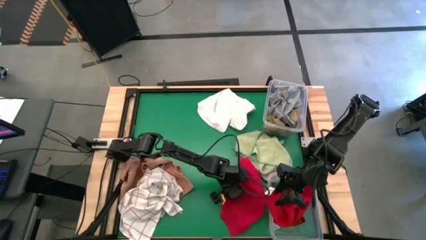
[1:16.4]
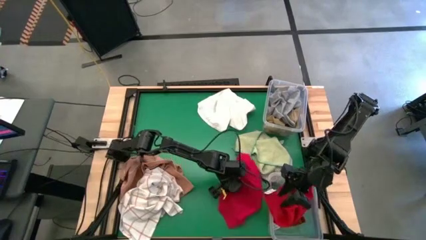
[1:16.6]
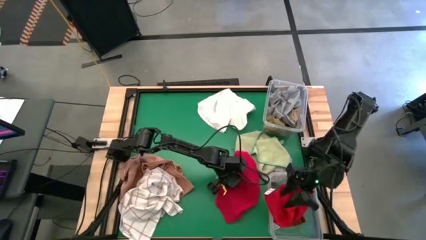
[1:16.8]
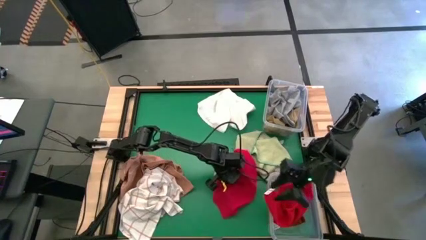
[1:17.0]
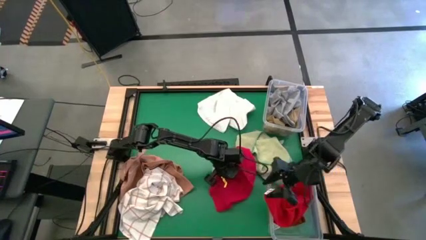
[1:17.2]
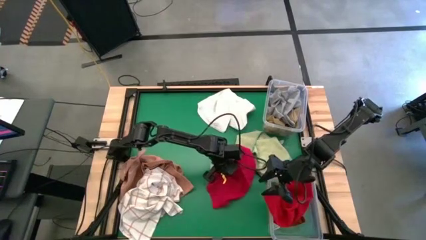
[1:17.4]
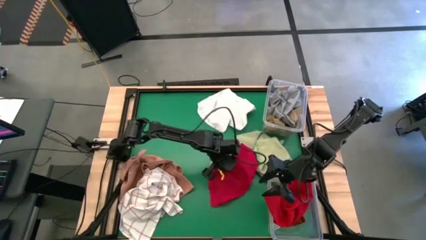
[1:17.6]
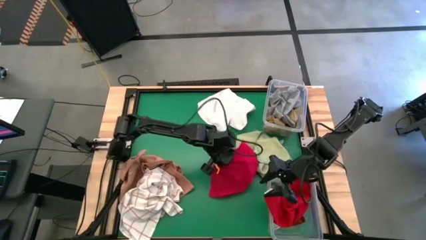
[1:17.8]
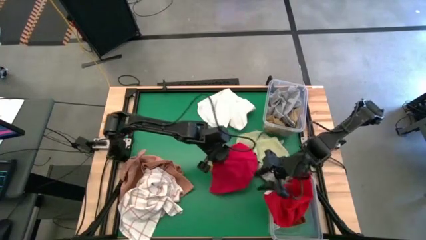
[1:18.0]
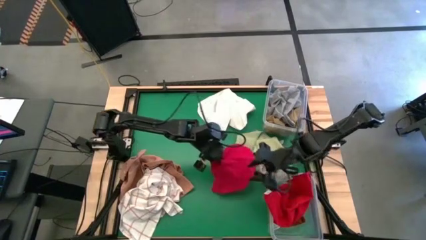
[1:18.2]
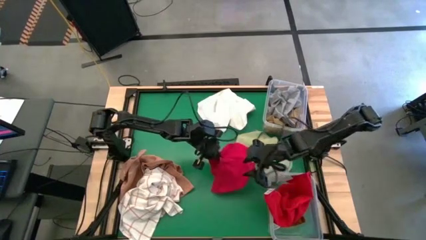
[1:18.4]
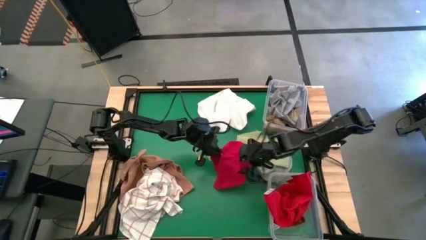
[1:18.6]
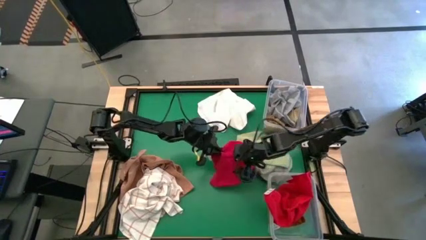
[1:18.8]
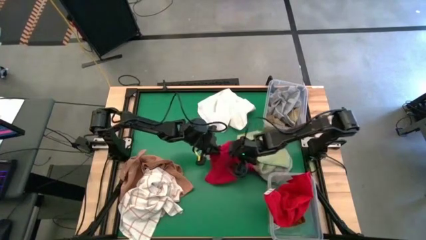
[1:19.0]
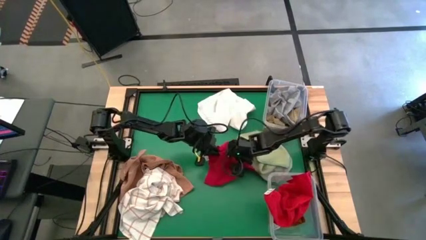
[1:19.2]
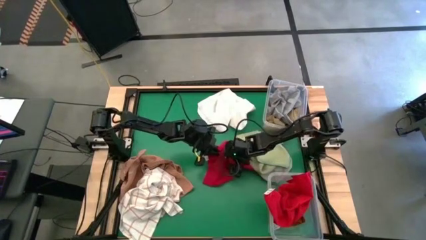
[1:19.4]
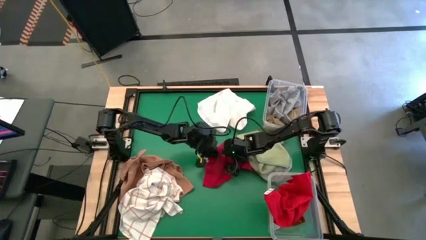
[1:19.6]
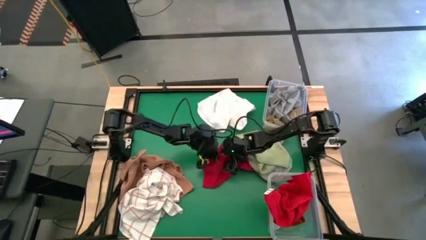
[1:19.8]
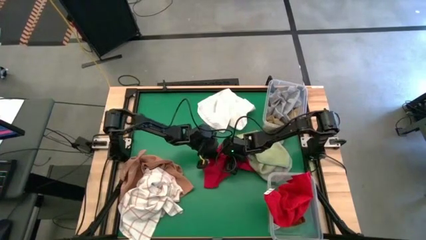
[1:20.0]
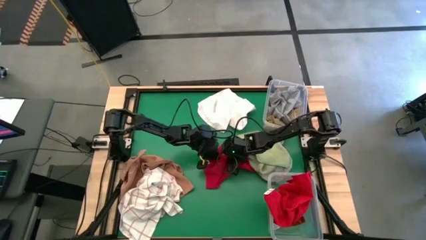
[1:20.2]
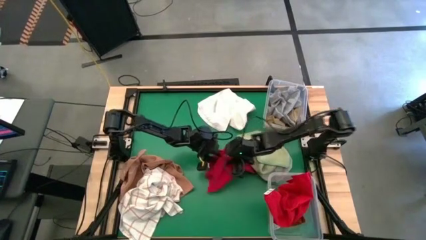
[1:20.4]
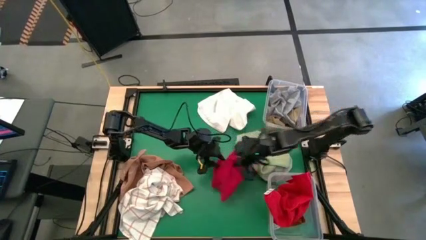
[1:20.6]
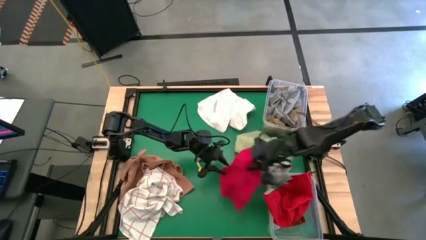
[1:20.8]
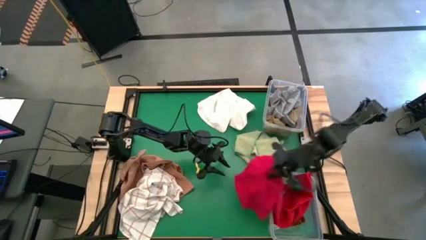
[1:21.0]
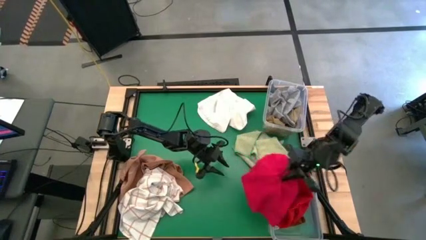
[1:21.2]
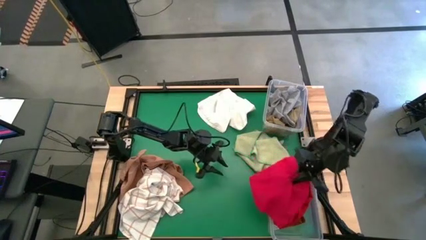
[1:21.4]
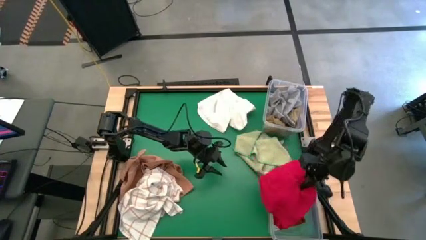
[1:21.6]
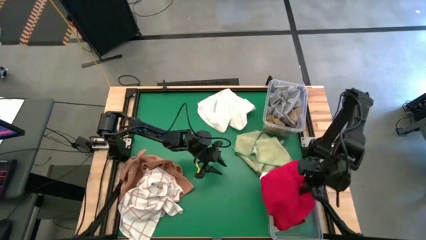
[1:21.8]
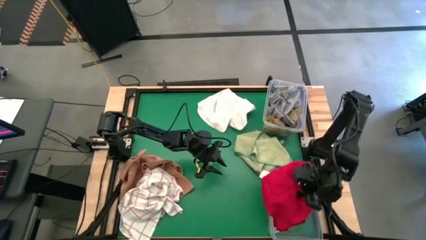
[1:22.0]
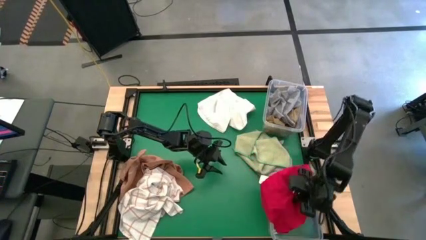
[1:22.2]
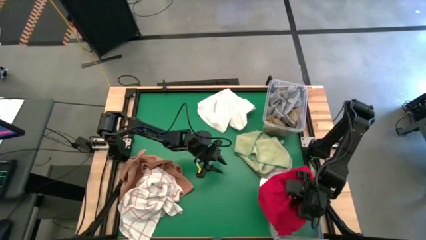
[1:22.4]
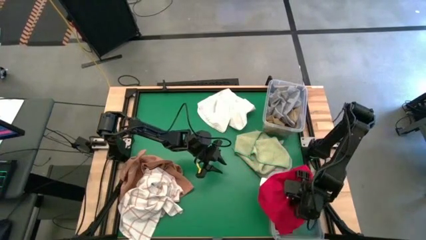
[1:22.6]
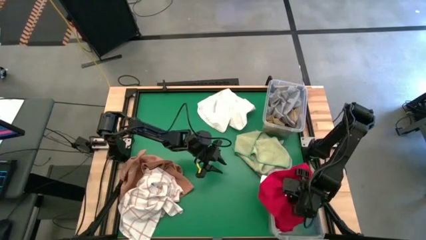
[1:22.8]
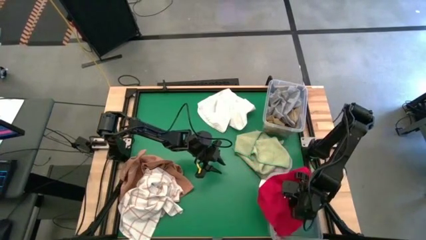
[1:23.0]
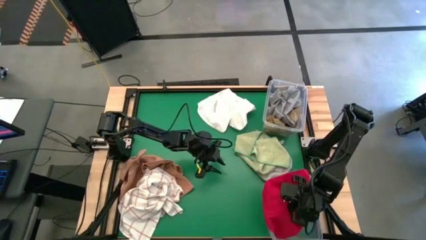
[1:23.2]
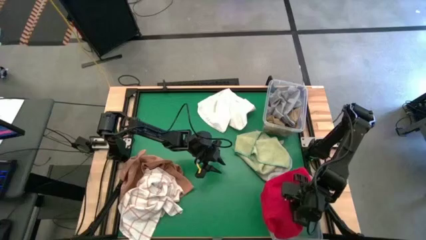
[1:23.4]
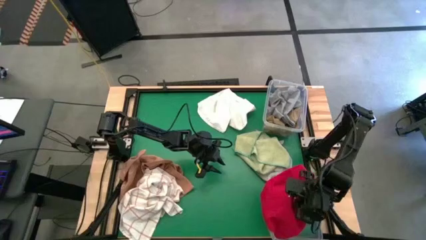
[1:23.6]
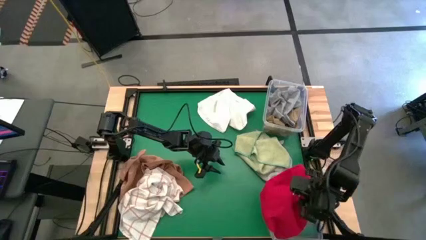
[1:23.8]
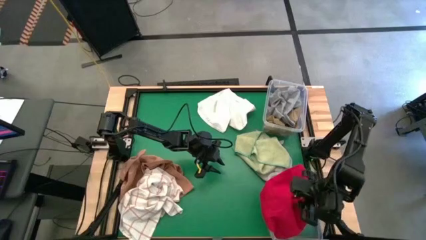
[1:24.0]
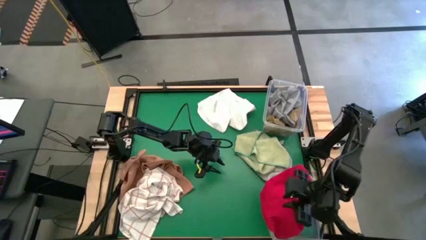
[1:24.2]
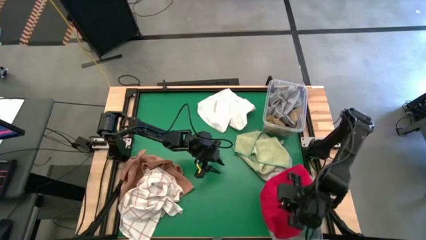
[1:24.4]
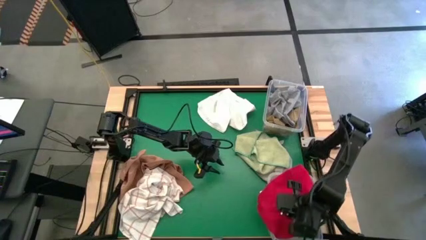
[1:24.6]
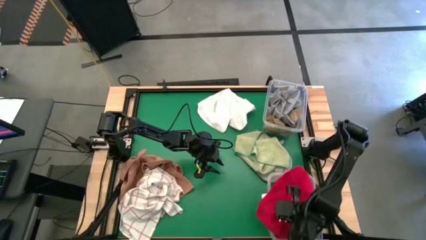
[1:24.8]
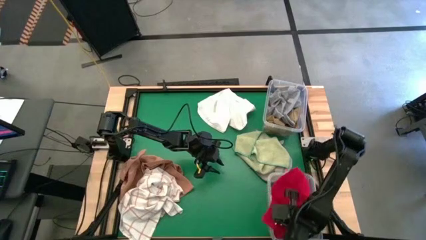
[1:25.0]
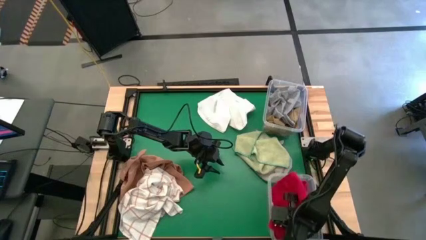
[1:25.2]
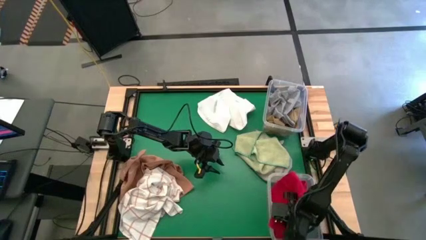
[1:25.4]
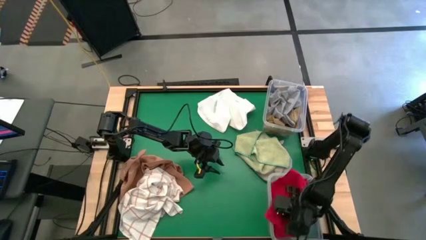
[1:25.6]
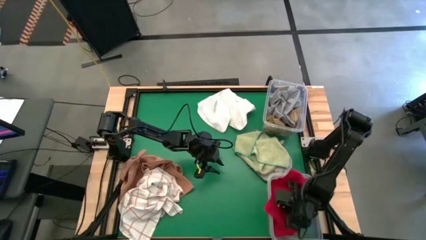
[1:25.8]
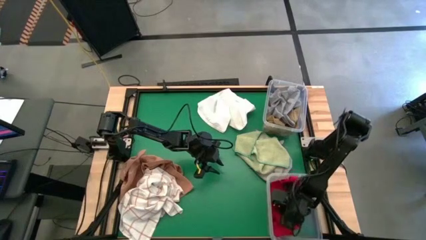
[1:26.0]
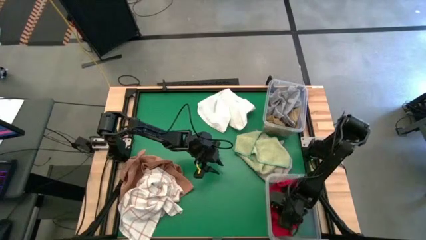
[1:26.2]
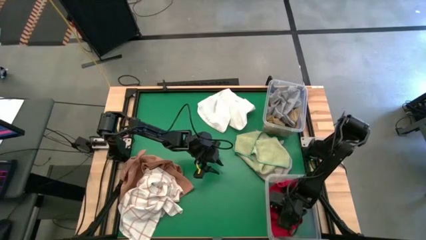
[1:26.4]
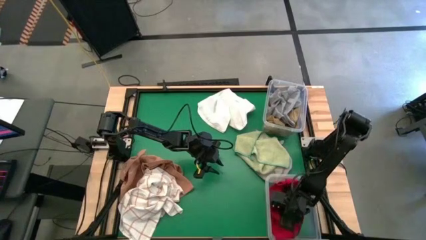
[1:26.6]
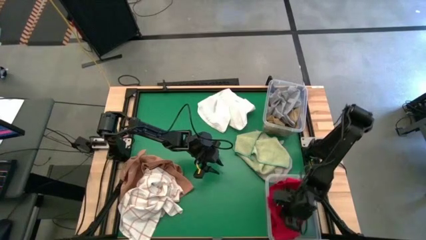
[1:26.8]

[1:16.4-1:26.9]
Task: Sort towels by color in basket
Put the red towel into the transparent bin

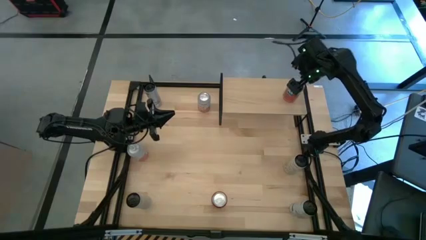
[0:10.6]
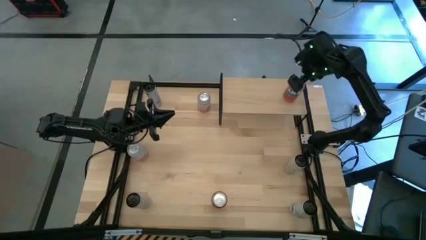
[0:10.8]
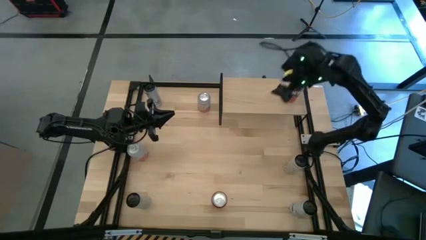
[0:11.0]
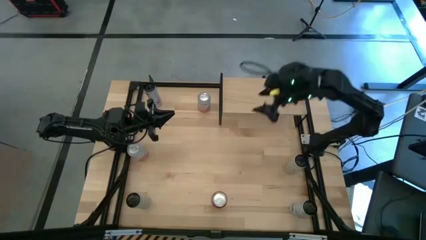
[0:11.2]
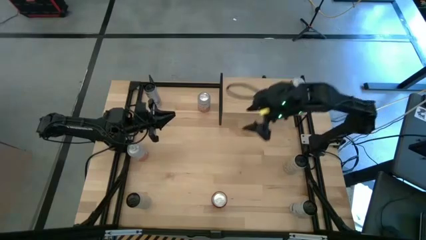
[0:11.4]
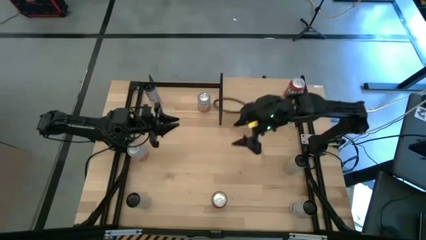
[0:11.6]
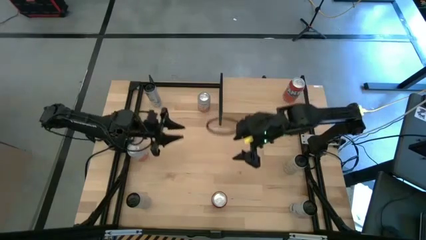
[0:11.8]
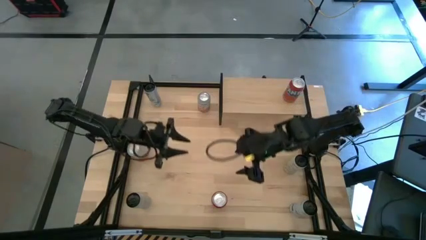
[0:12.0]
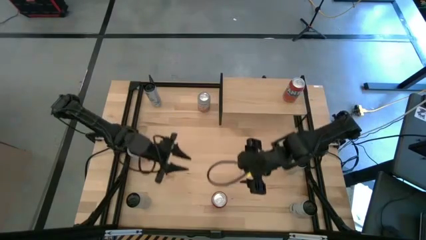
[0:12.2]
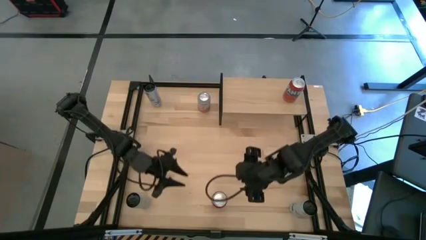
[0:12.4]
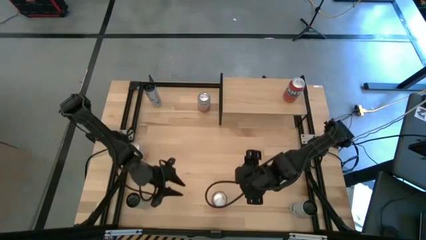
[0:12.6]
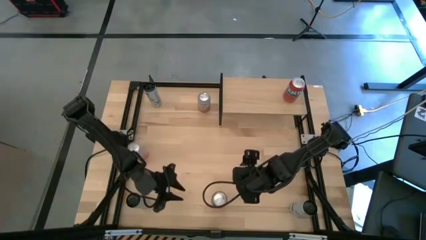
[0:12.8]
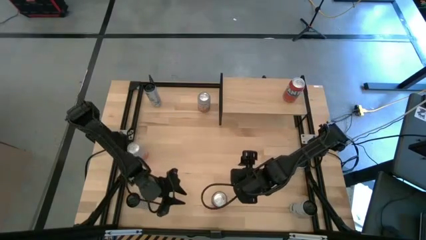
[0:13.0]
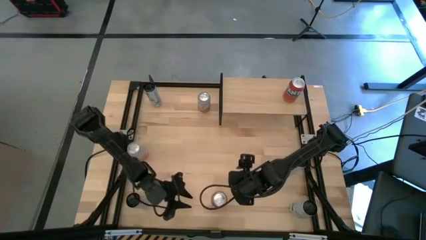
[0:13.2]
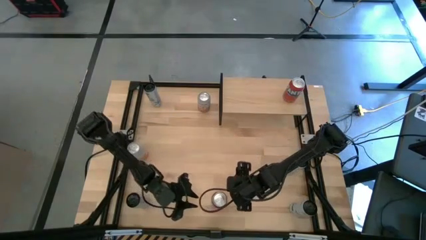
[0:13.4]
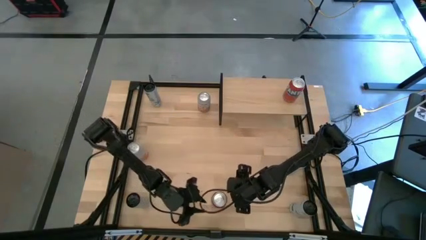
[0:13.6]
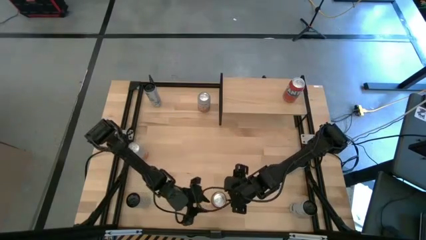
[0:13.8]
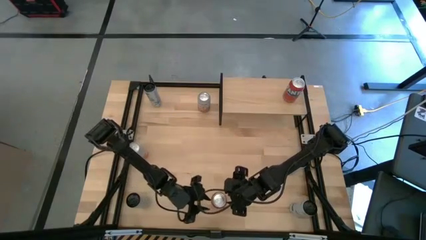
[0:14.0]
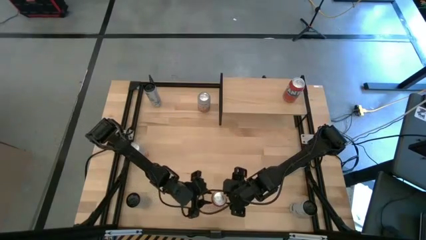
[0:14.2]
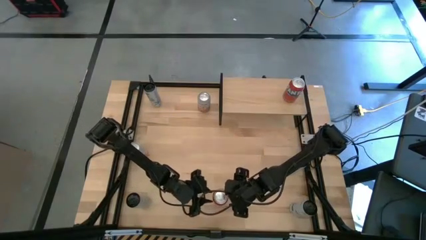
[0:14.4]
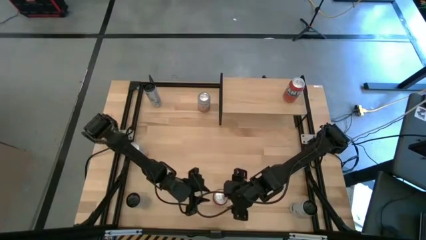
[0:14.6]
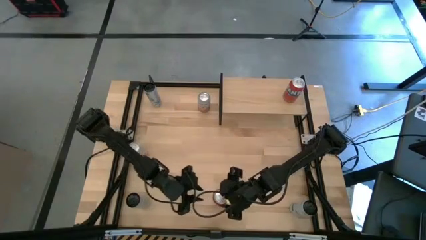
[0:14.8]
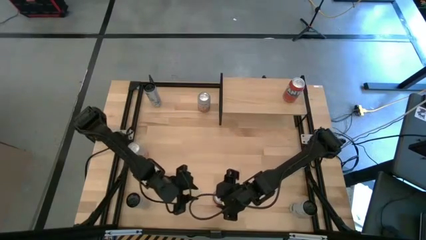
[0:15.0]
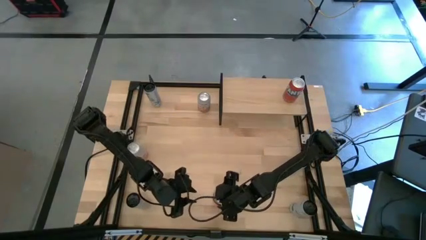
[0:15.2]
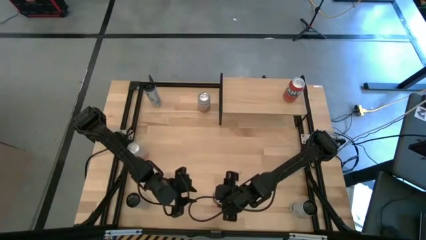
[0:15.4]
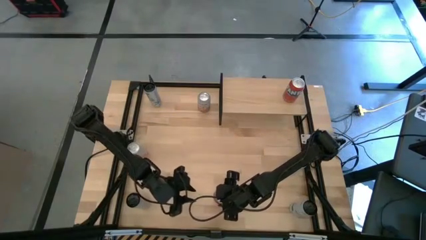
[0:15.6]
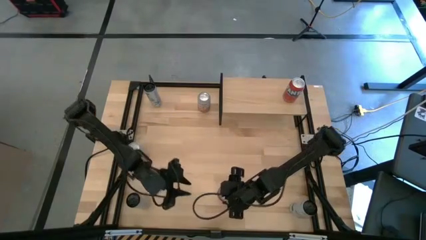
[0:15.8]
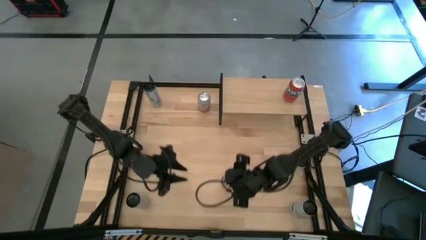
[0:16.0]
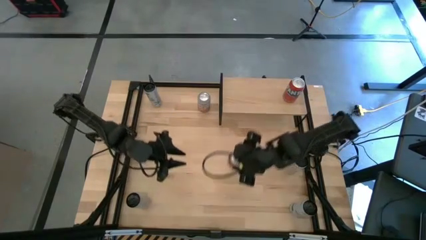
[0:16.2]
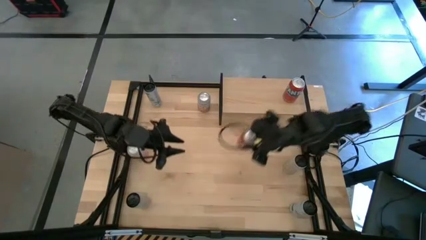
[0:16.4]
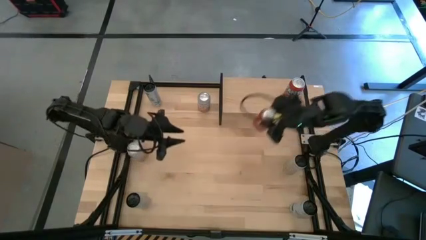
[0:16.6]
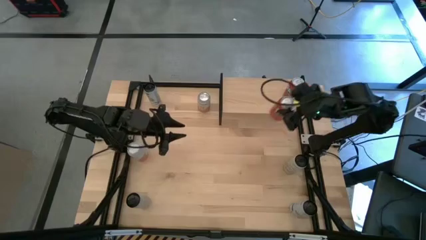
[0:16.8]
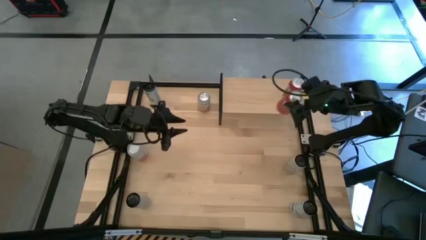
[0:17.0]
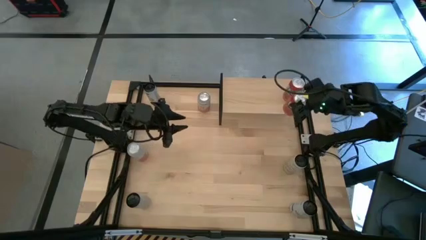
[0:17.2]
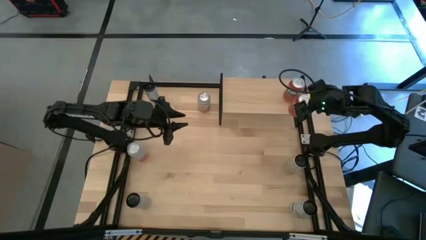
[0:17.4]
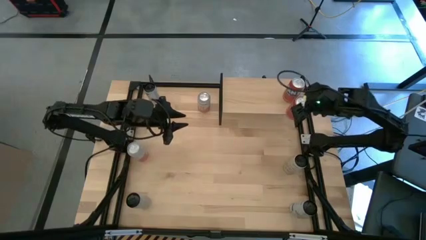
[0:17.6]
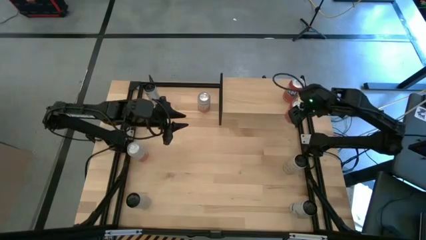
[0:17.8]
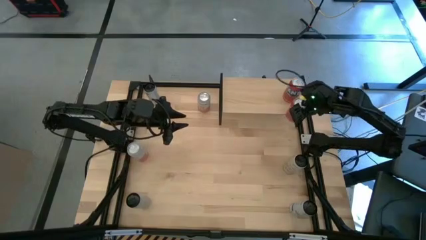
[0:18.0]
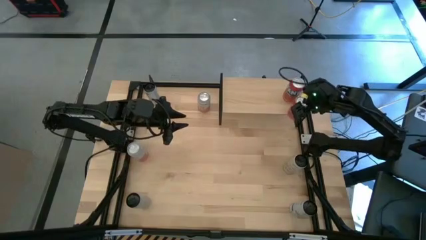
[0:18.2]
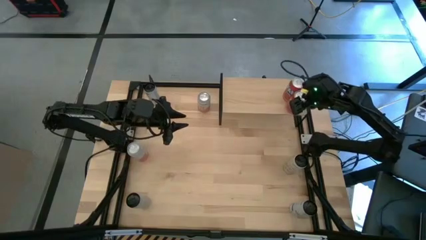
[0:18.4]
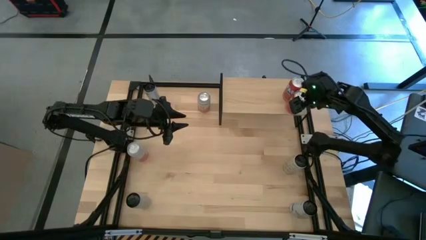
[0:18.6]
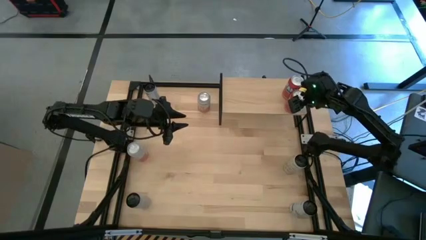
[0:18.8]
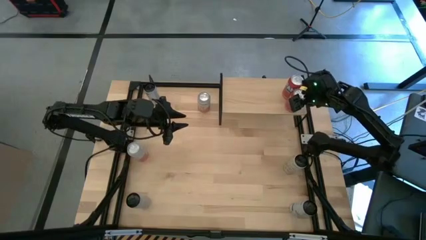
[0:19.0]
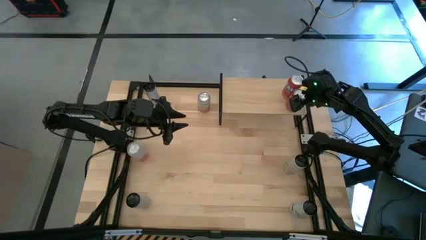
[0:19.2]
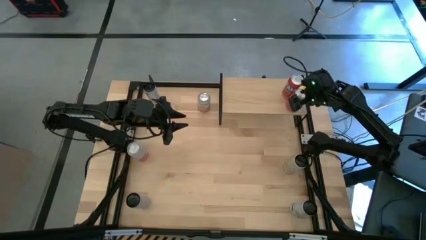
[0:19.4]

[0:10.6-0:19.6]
Task: Place canned beverage on shelf
Put the red soda can on the shelf aligned with the red soda can
